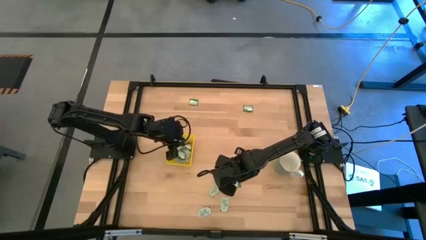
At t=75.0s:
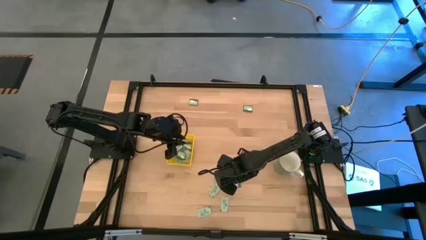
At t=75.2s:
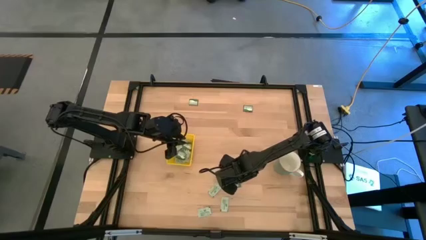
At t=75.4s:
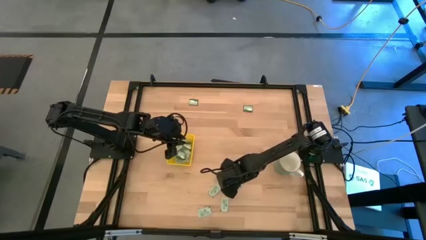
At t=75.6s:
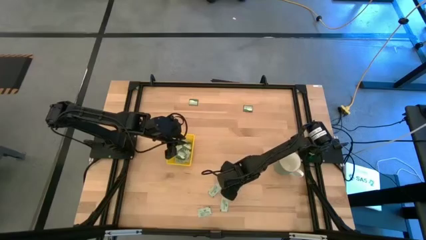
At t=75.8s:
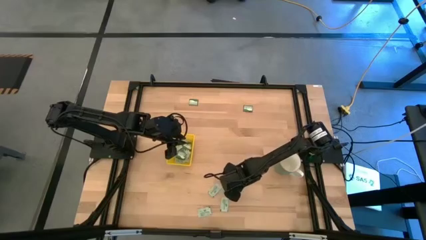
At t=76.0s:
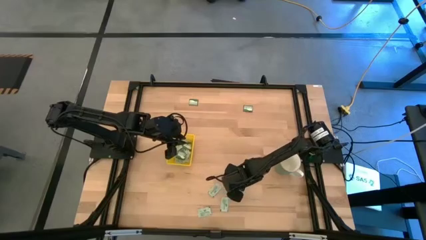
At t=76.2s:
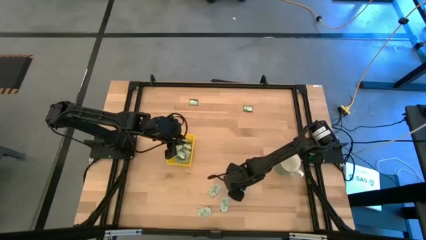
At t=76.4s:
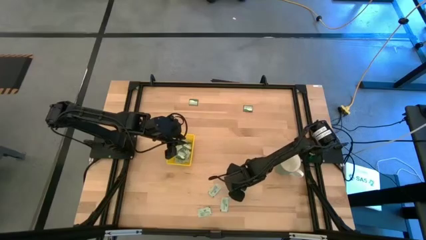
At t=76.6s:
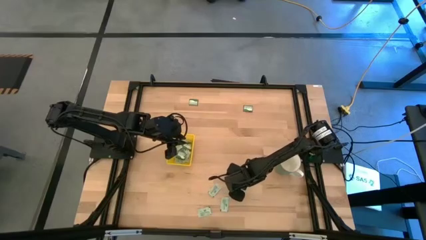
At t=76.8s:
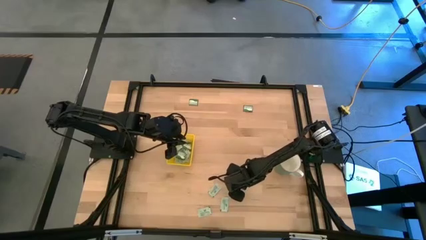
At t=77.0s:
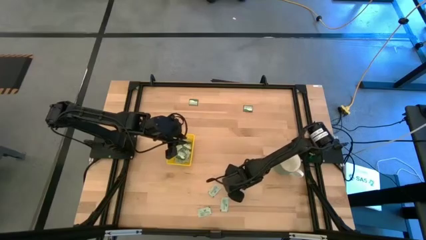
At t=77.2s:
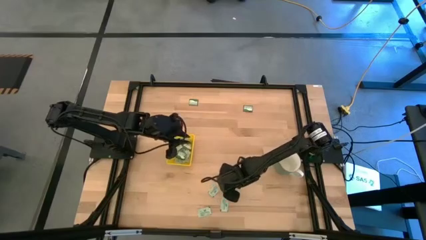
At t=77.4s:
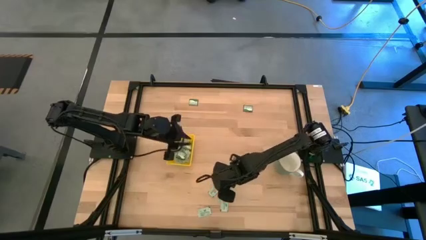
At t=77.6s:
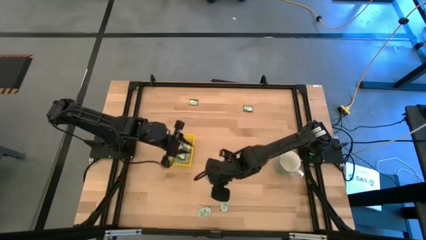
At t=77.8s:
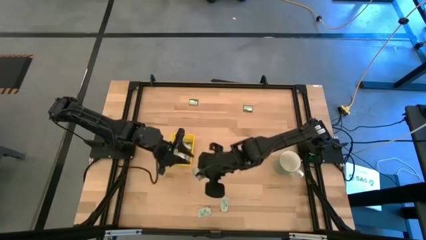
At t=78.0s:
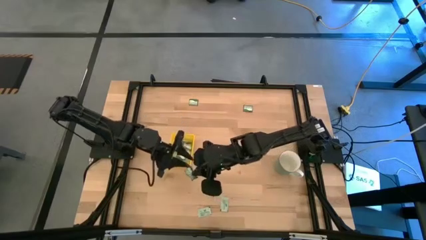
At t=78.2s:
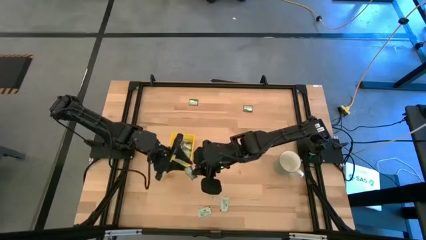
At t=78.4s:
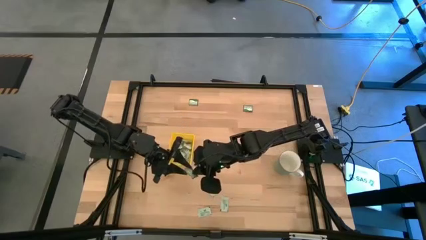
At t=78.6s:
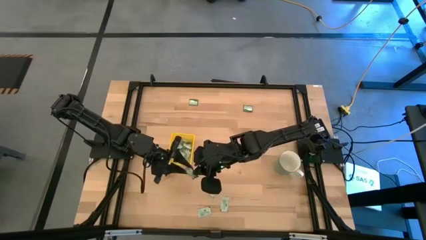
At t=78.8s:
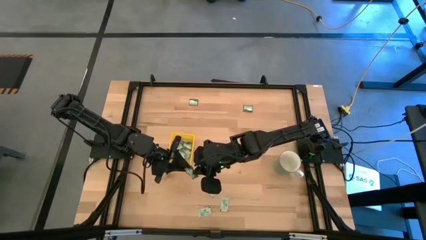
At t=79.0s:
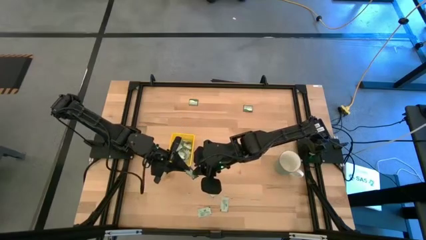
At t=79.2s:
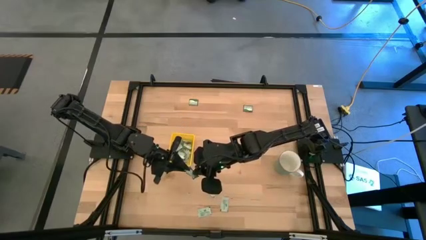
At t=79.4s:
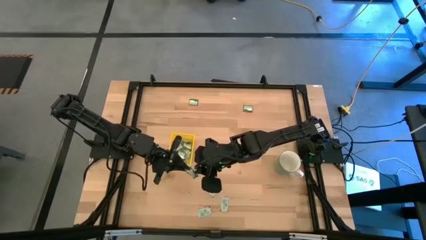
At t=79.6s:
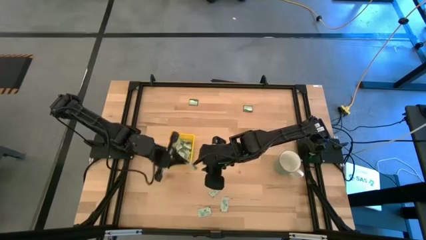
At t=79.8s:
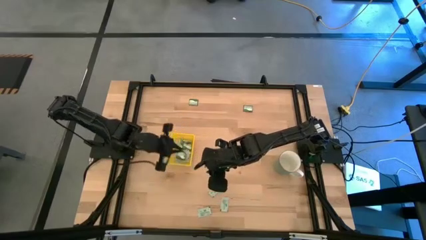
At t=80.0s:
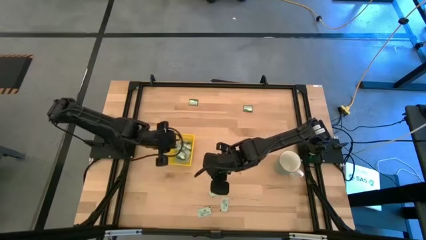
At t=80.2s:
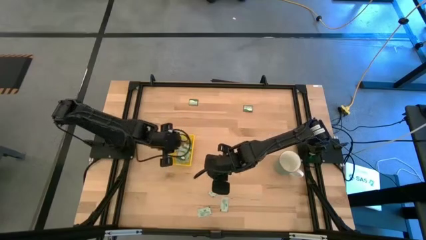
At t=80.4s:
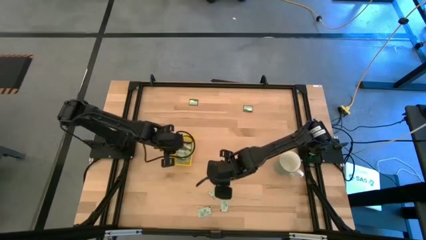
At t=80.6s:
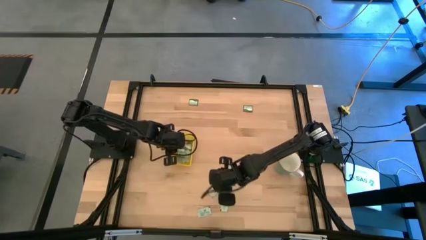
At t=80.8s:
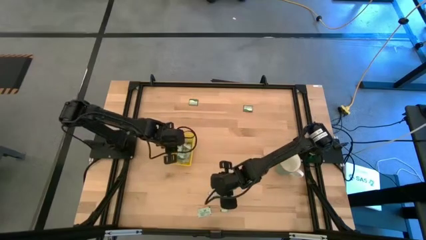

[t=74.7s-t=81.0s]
Task: Pick and place Stevia / Truvia into bins
Put the green packet into the yellow bin

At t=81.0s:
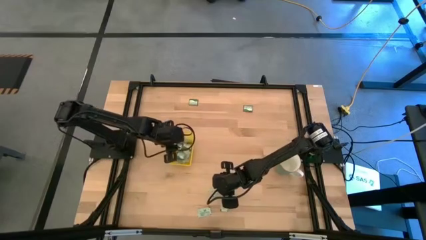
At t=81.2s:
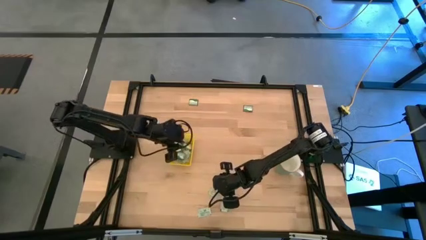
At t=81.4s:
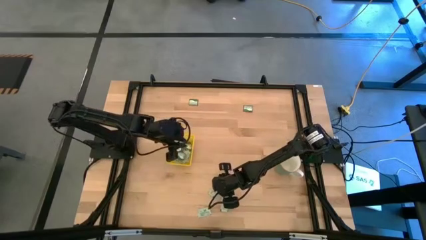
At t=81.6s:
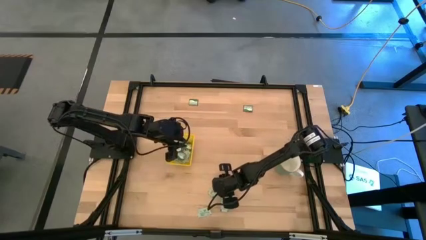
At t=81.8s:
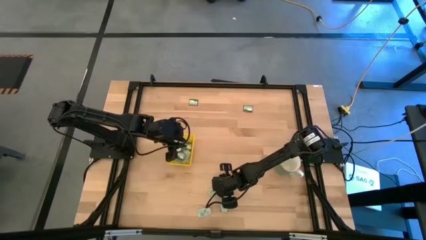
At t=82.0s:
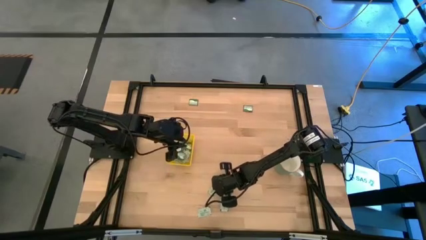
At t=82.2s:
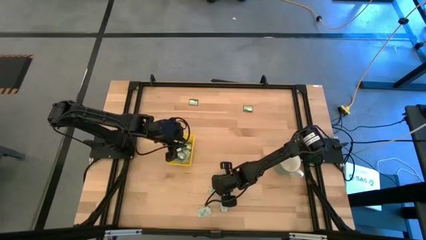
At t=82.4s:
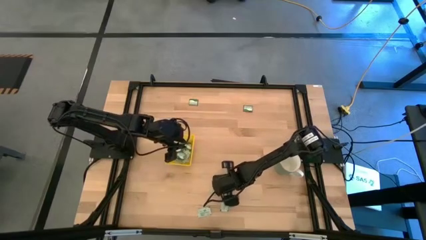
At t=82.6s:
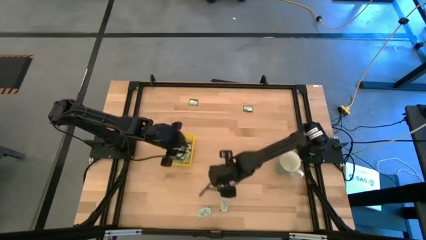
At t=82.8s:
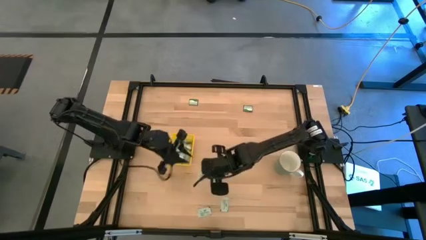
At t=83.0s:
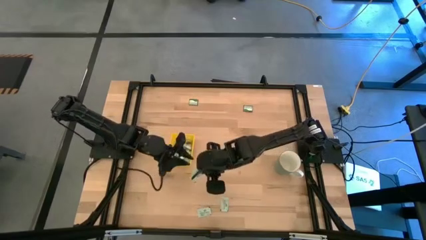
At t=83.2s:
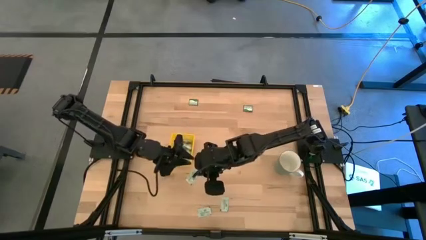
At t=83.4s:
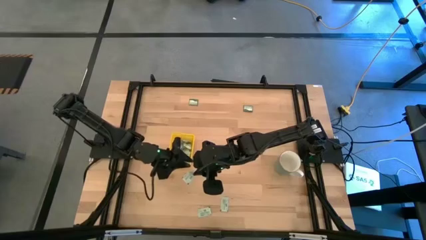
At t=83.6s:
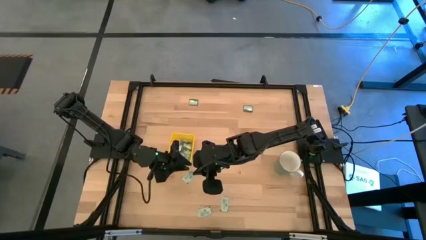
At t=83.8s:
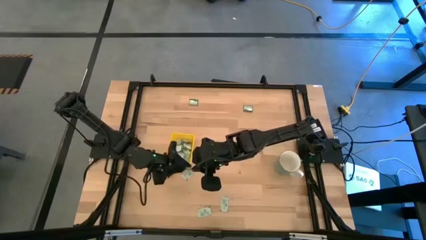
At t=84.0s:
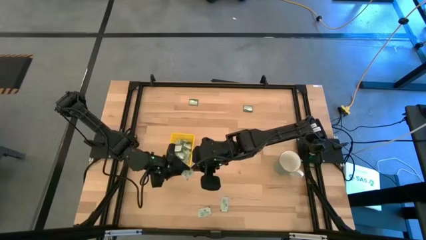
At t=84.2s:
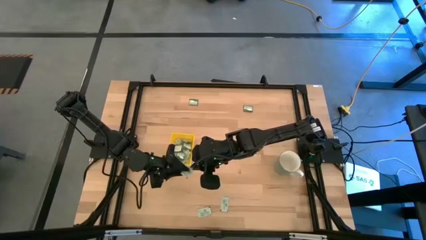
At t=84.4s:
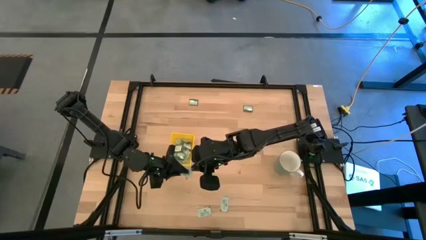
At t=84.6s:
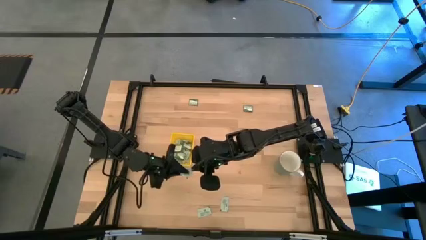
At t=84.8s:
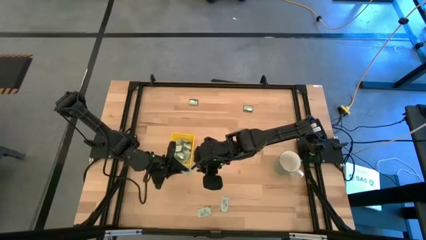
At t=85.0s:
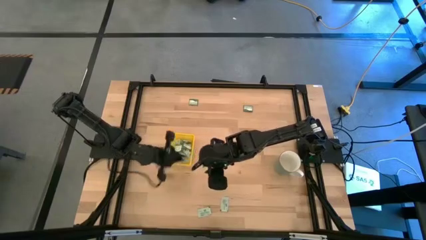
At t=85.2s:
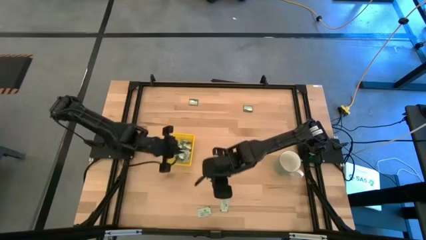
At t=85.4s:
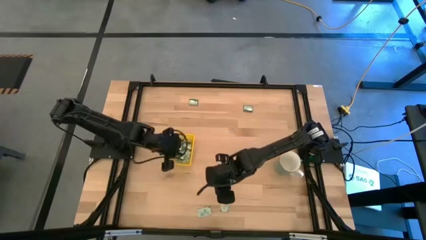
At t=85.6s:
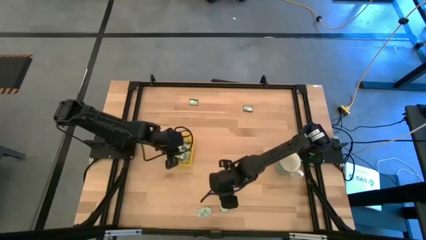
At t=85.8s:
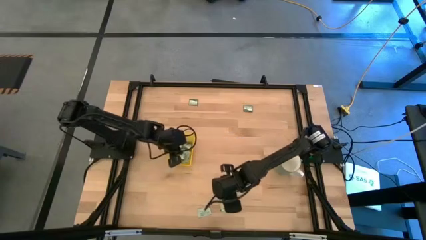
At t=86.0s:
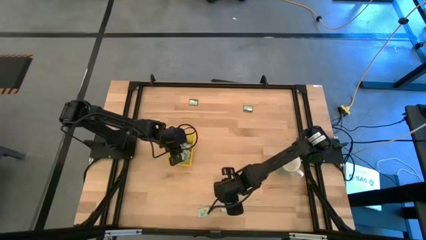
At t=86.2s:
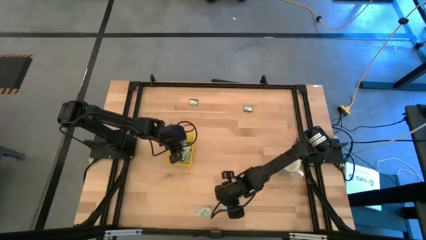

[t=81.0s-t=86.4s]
Put the white packet into the yellow bin

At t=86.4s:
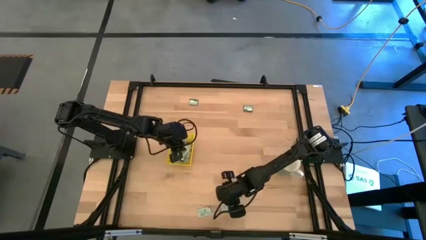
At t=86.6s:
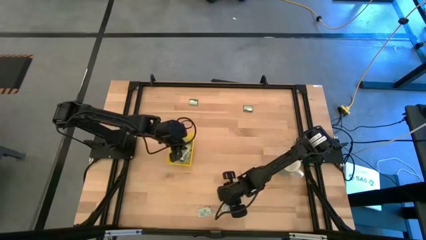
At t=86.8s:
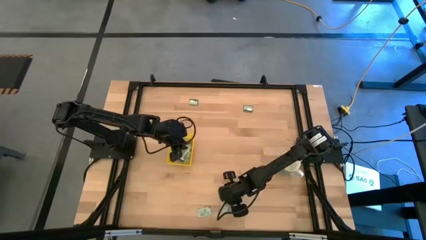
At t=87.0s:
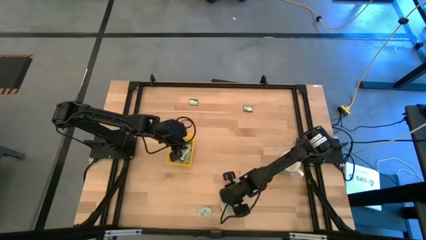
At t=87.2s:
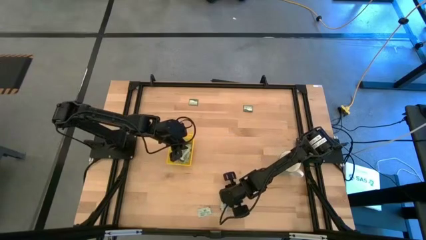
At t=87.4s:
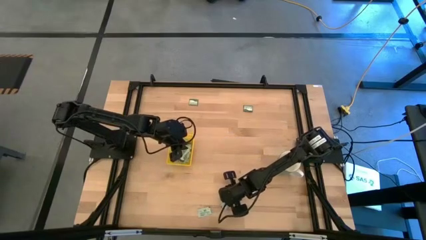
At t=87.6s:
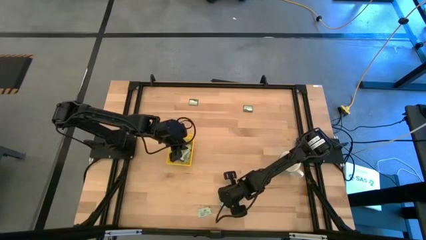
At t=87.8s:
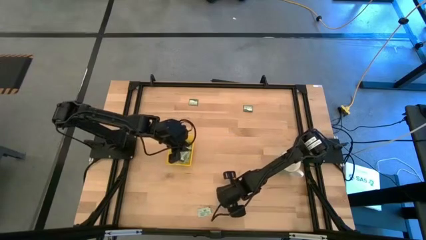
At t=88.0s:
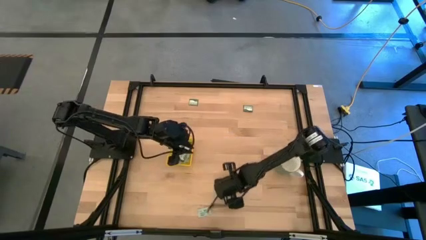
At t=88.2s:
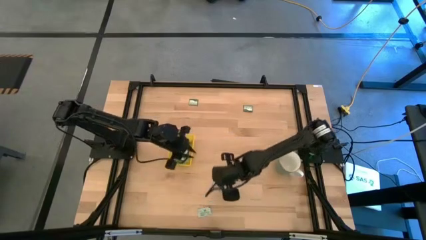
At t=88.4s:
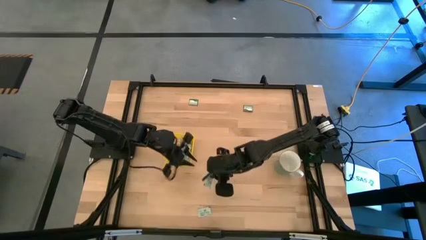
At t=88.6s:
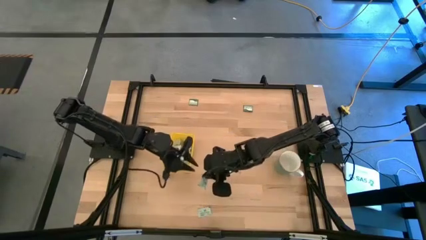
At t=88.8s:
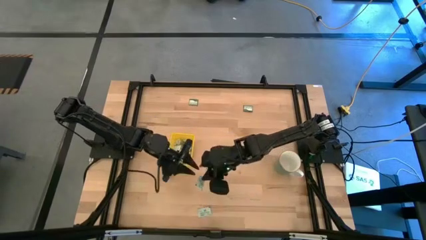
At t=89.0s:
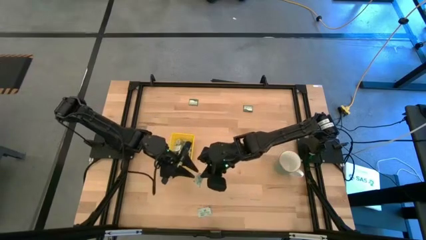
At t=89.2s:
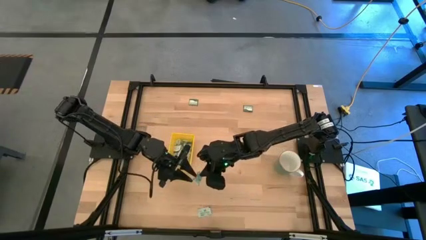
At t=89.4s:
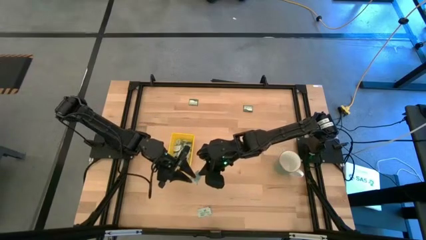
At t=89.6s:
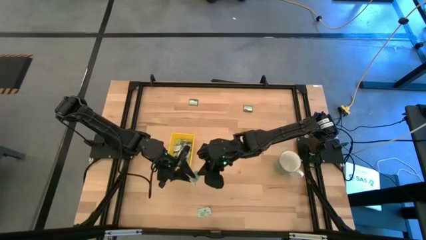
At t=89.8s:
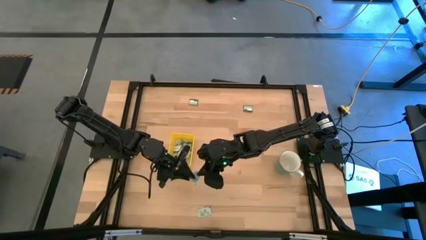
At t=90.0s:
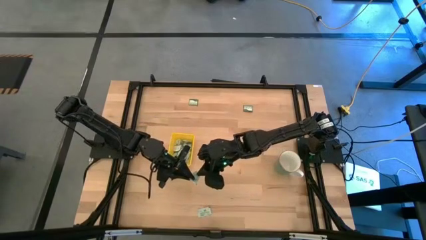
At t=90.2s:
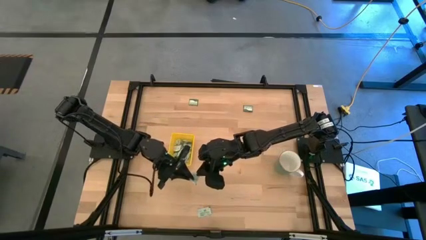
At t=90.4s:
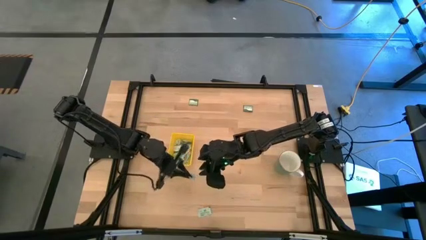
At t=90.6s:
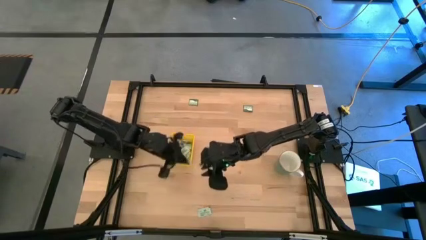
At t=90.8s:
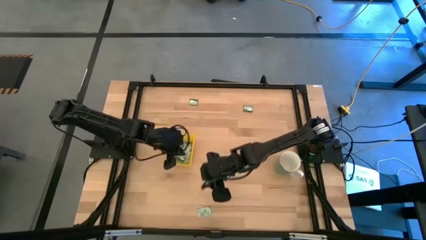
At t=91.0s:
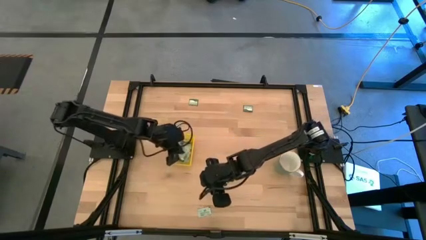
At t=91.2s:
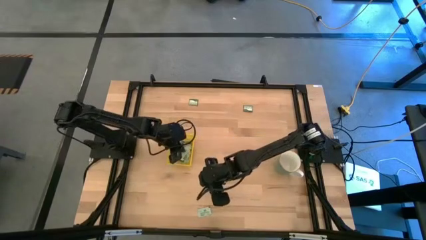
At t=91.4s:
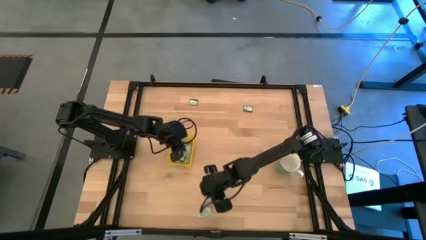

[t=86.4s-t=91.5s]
Put the white packet into the yellow bin
